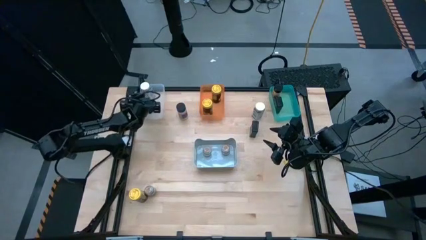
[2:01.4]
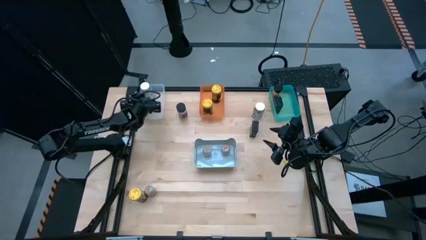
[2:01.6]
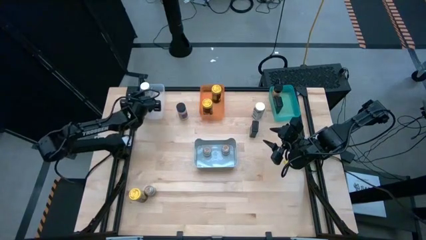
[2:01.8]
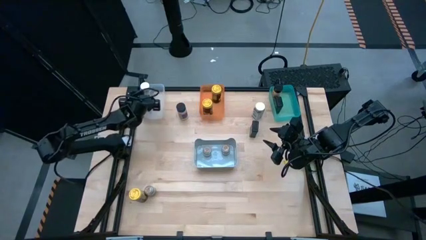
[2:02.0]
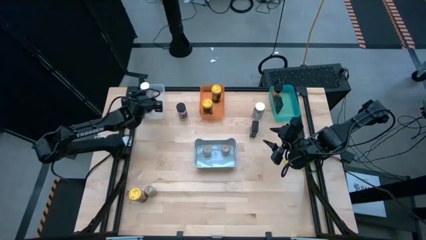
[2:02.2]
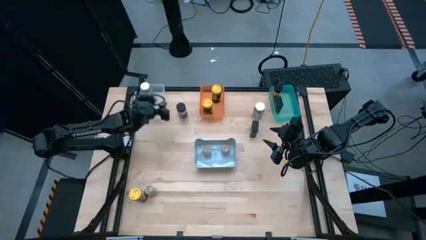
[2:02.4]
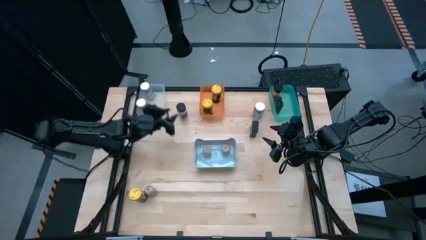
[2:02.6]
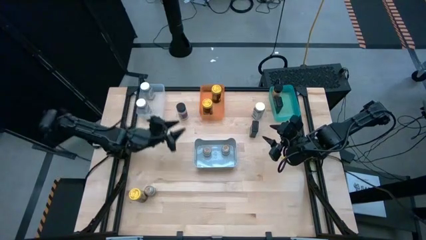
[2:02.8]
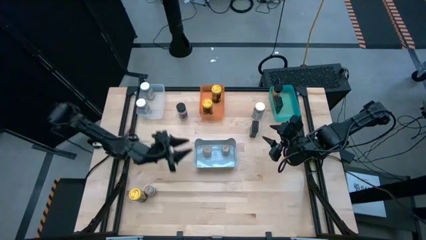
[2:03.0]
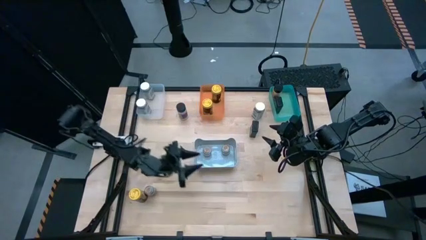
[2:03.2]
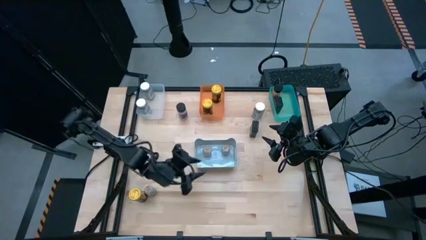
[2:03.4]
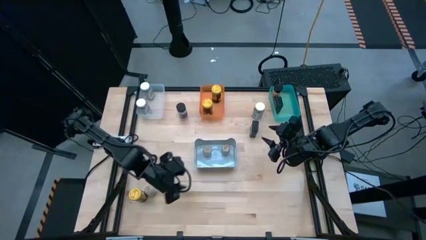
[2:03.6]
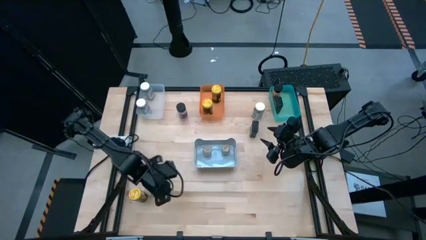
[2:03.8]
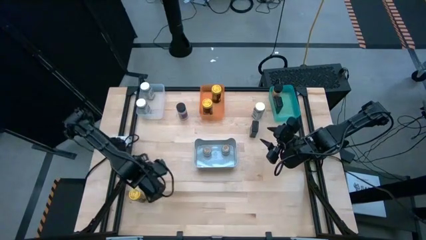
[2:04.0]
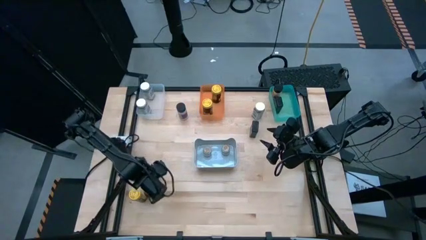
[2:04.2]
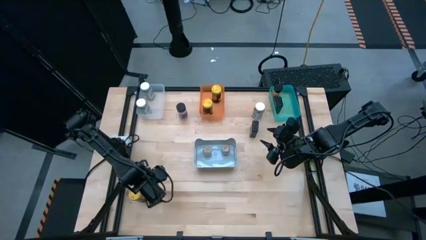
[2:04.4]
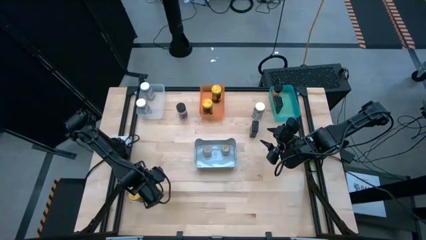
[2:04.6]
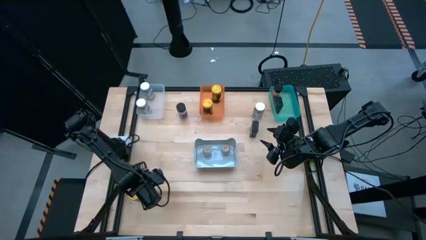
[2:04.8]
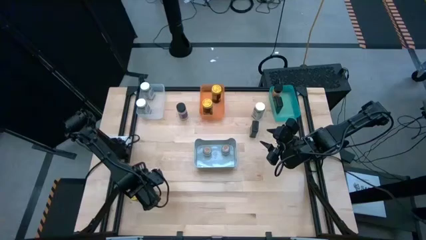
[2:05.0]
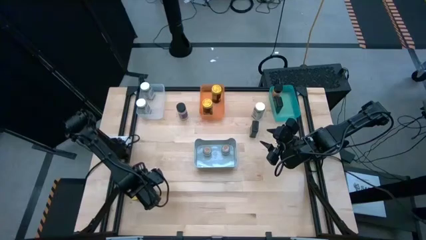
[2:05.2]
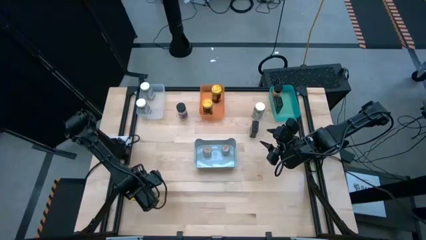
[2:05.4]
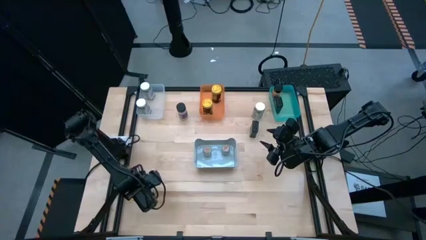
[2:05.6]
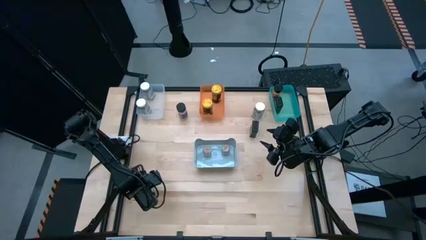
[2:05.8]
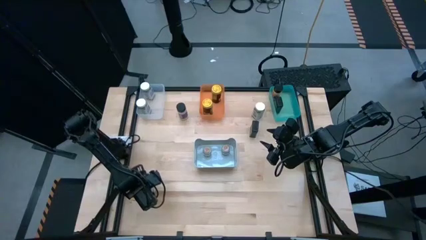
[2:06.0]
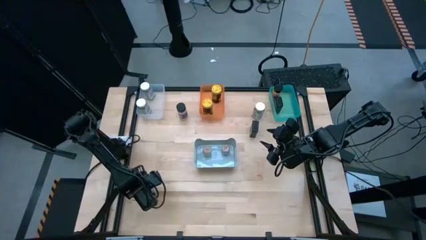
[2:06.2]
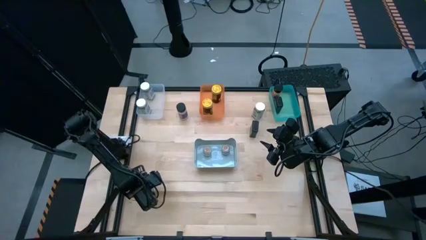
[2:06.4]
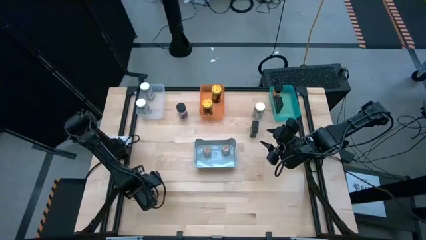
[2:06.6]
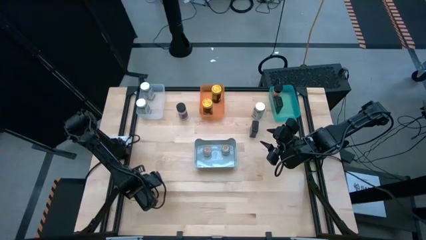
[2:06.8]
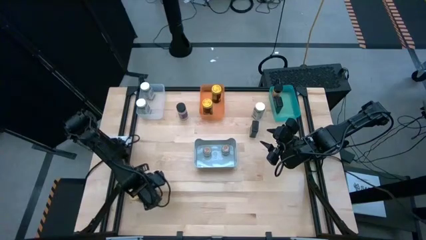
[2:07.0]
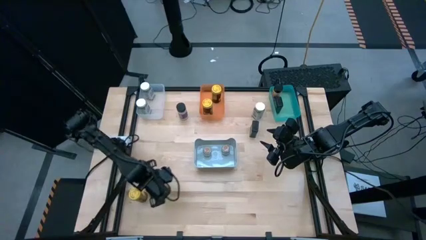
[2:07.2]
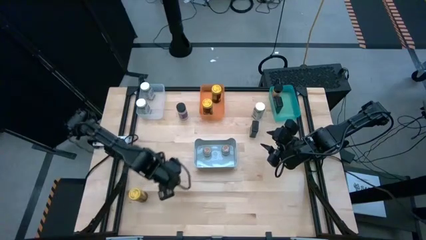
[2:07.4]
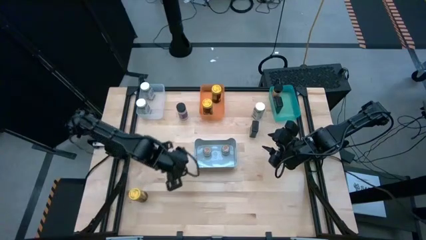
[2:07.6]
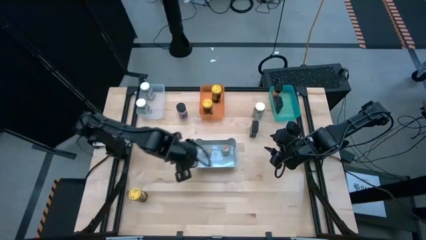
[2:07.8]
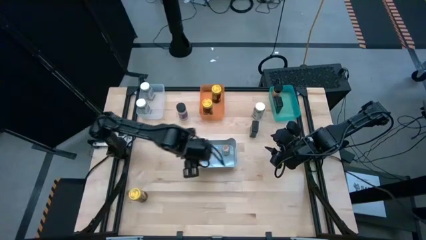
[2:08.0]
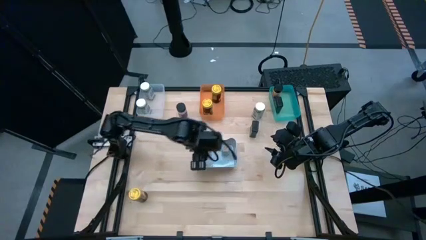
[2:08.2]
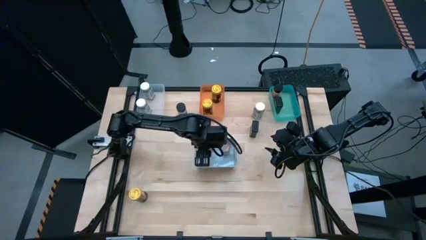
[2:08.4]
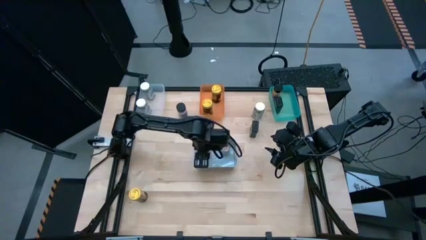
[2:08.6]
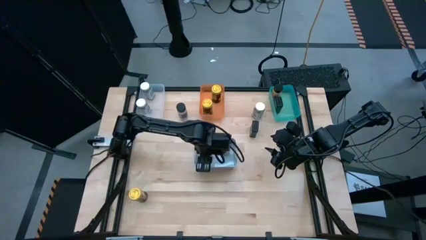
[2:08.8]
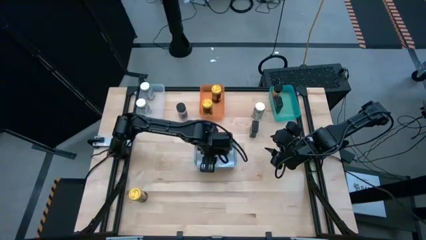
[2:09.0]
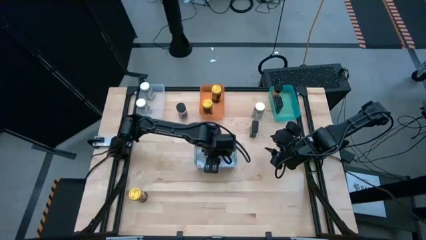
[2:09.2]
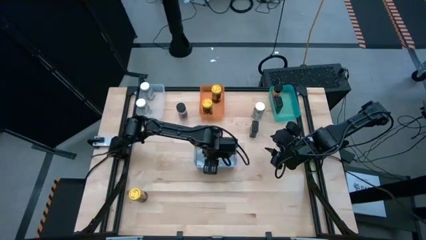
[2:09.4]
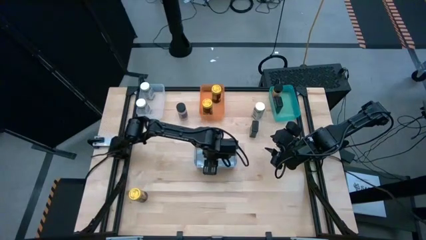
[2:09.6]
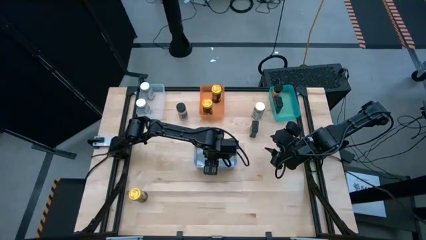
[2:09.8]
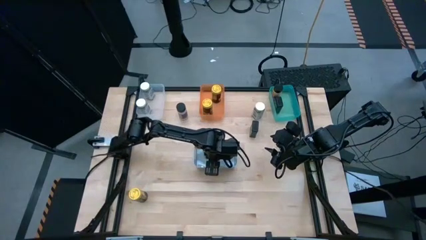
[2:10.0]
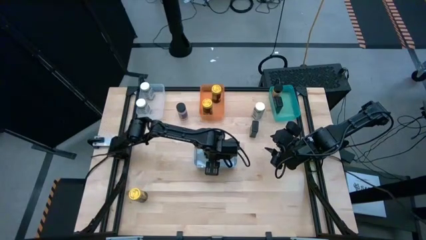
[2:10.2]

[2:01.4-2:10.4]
Task: Sort spices by type
Put the brown seasoning bottle into the gray bin

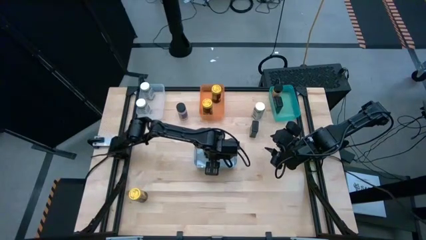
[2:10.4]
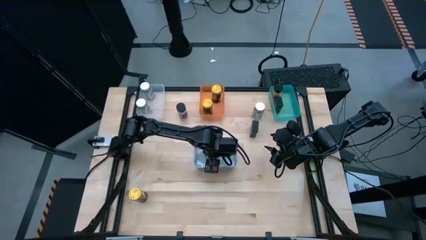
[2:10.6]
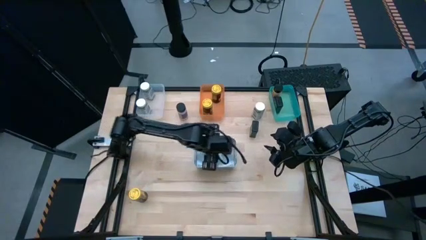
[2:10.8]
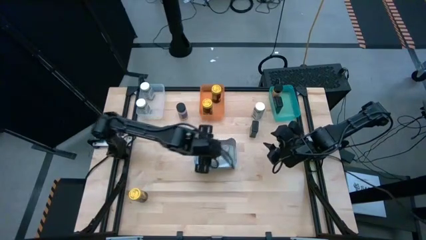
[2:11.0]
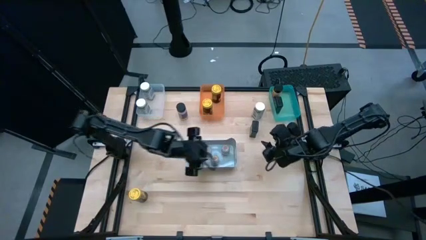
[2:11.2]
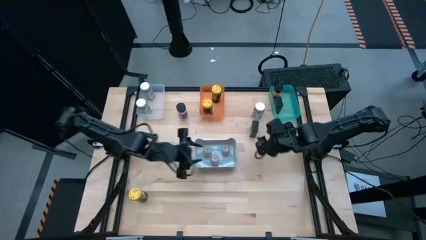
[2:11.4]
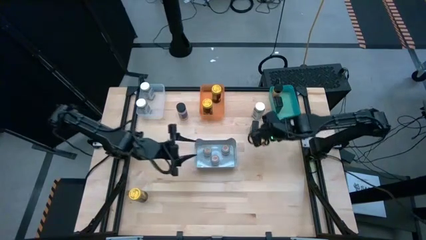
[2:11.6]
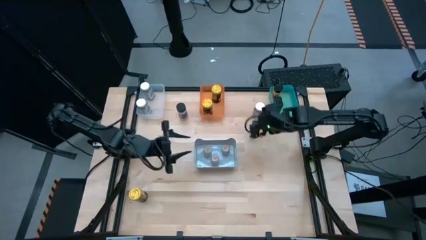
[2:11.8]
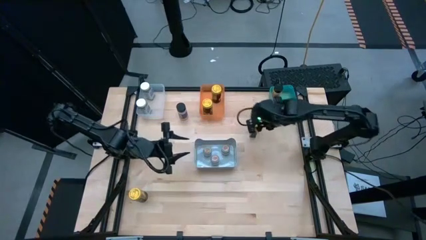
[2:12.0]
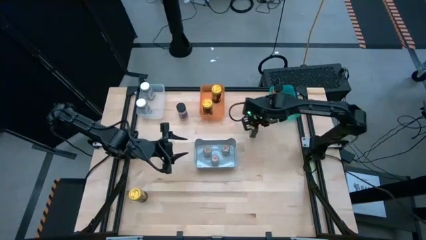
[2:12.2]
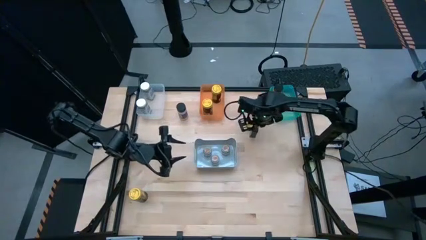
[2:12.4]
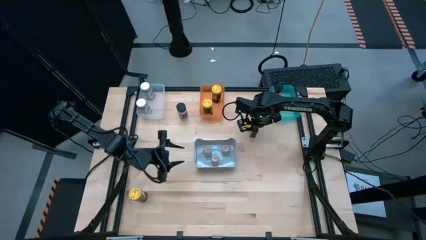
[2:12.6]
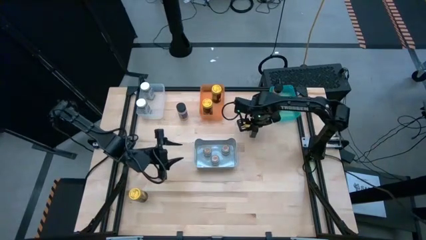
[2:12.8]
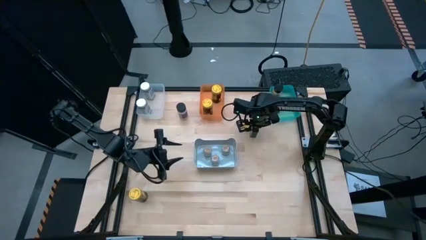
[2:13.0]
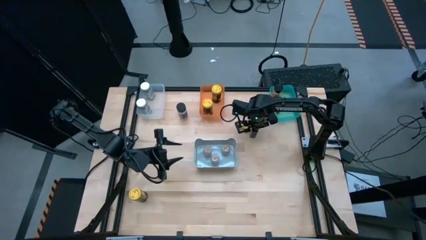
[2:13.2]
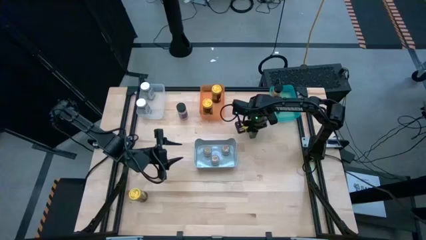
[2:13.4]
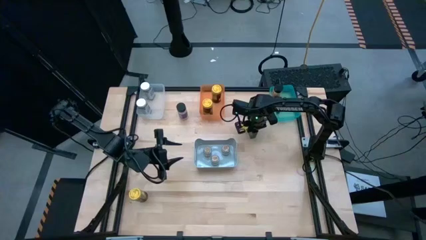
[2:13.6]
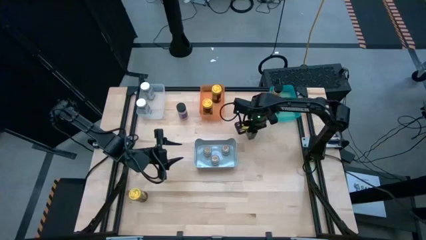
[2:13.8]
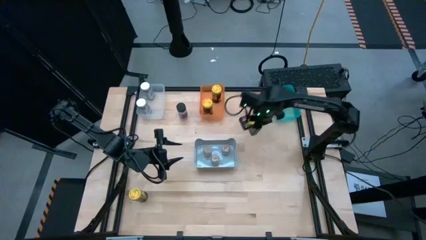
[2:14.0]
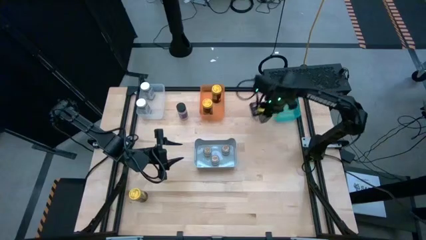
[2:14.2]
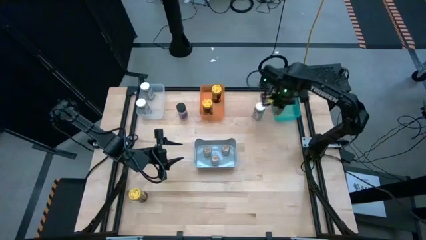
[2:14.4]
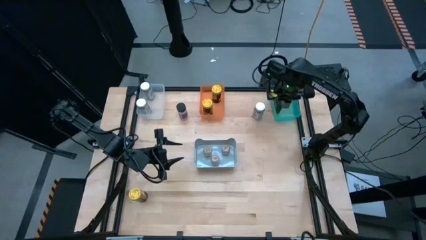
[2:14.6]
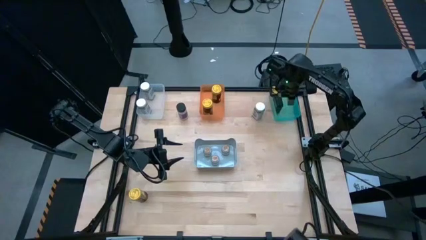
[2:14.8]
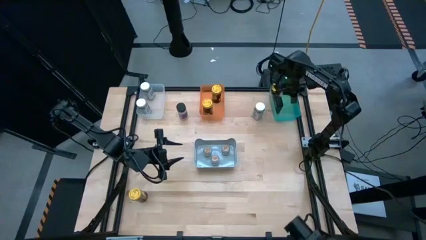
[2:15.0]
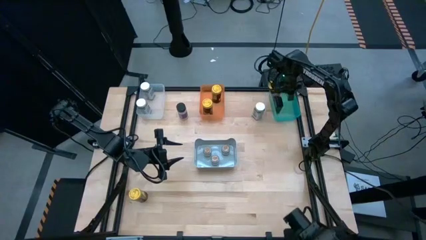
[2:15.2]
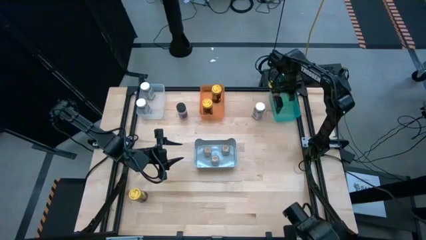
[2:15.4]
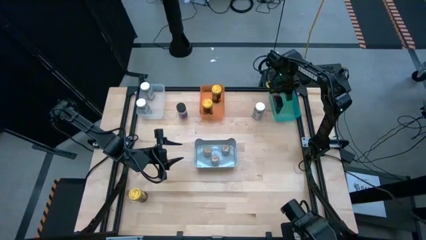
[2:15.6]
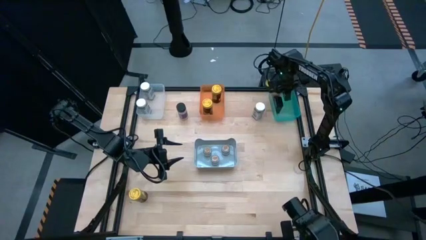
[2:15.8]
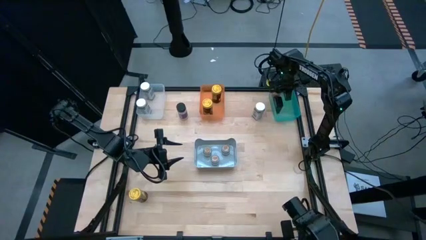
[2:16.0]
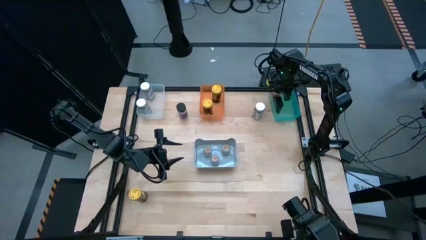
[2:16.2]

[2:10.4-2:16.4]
Put the black seasoning can into the green bin
